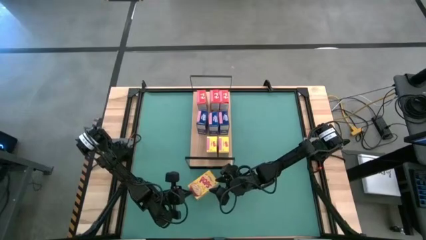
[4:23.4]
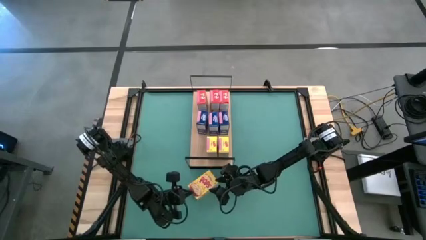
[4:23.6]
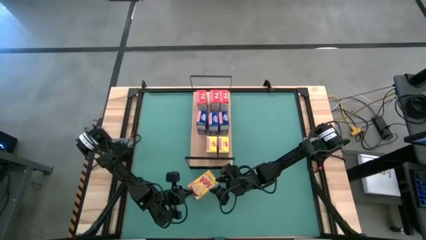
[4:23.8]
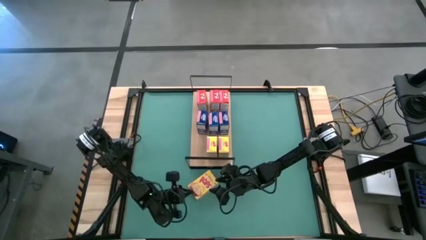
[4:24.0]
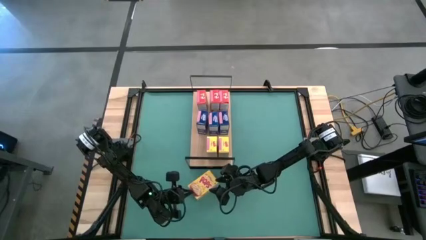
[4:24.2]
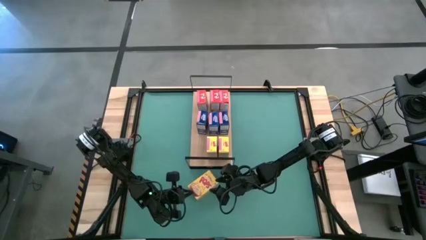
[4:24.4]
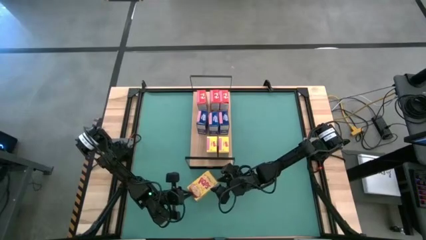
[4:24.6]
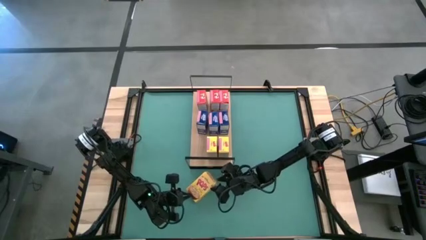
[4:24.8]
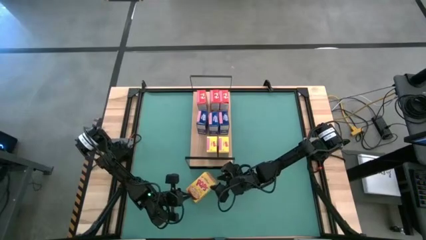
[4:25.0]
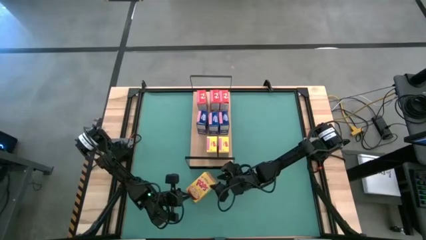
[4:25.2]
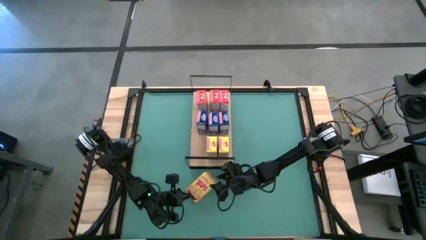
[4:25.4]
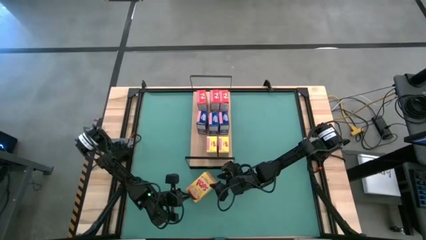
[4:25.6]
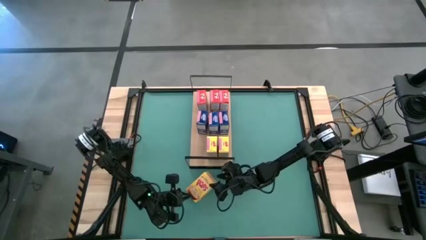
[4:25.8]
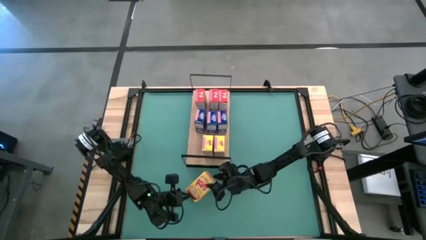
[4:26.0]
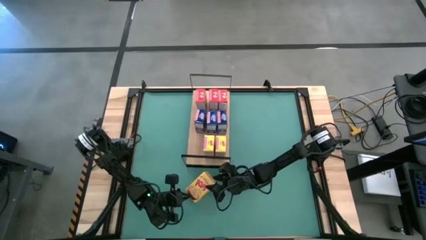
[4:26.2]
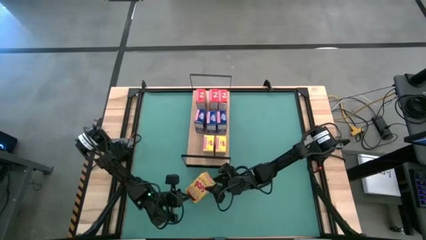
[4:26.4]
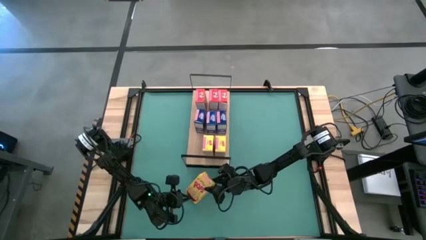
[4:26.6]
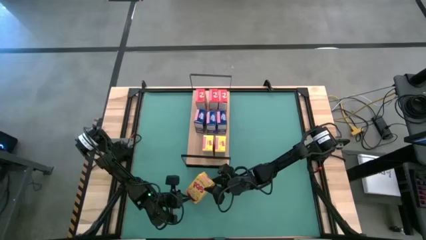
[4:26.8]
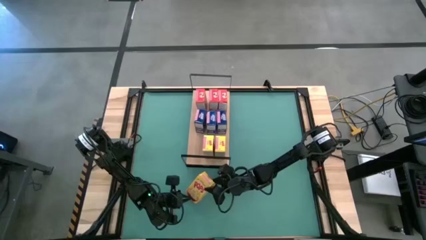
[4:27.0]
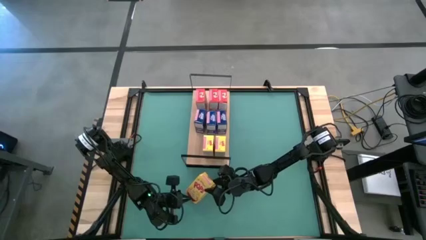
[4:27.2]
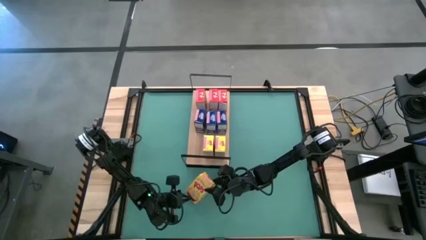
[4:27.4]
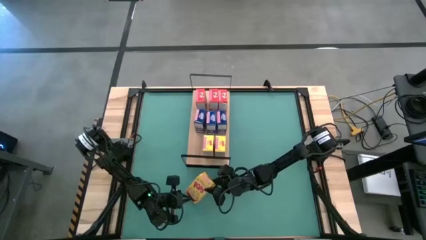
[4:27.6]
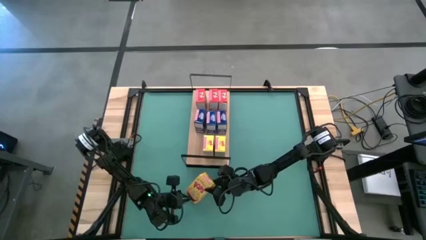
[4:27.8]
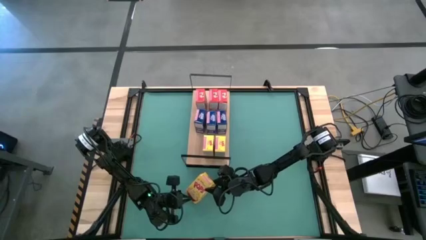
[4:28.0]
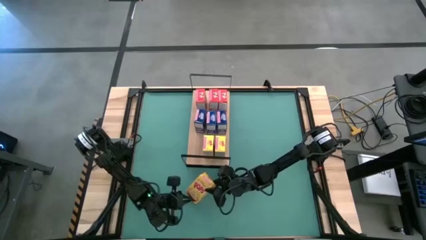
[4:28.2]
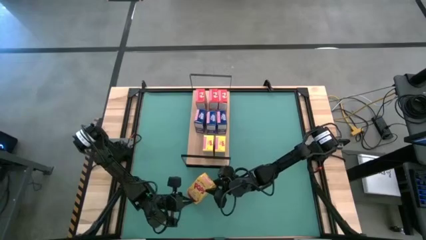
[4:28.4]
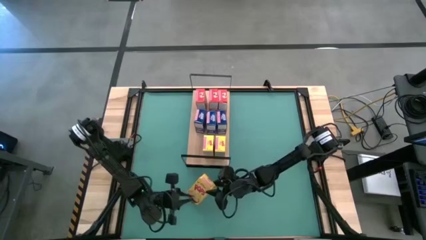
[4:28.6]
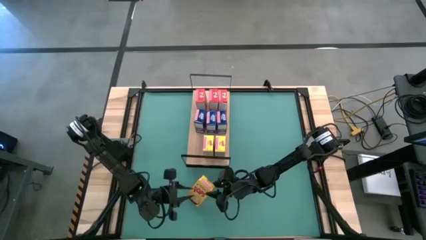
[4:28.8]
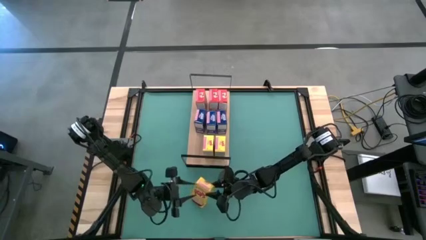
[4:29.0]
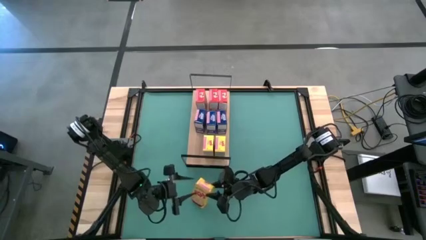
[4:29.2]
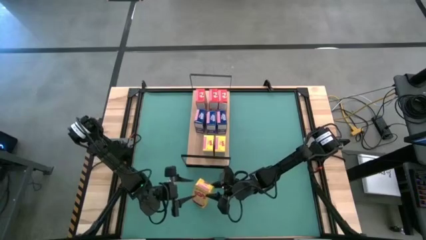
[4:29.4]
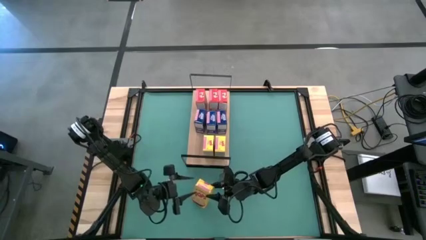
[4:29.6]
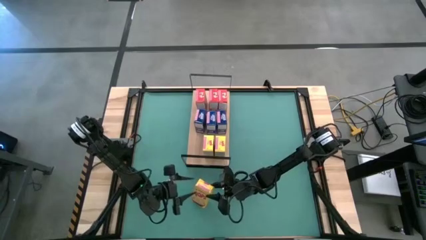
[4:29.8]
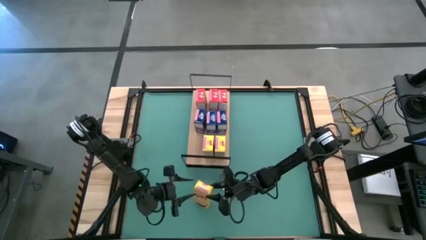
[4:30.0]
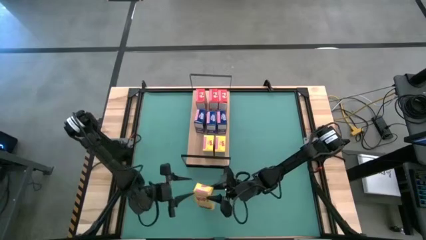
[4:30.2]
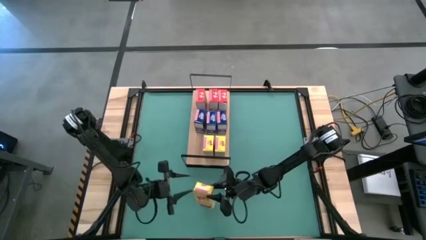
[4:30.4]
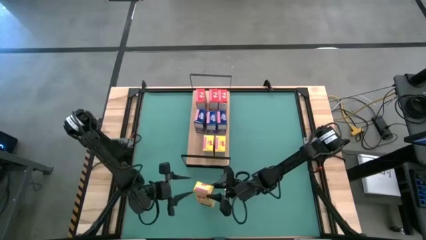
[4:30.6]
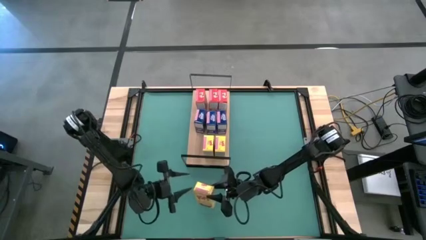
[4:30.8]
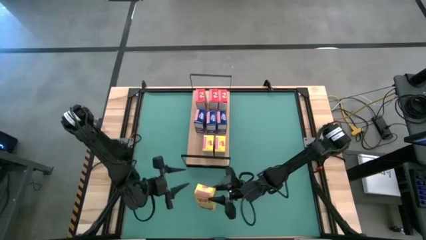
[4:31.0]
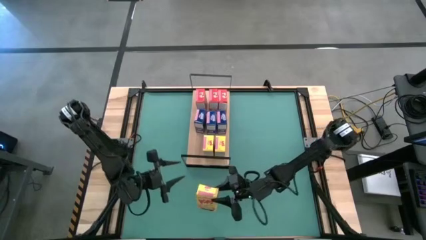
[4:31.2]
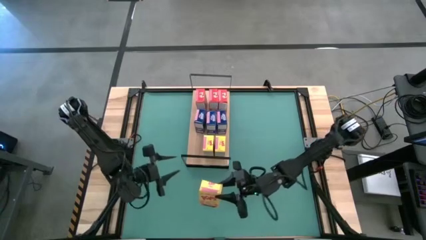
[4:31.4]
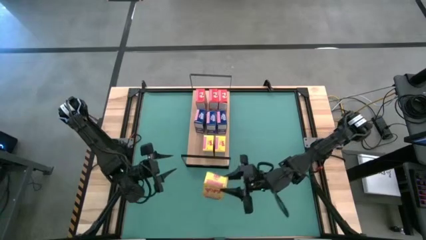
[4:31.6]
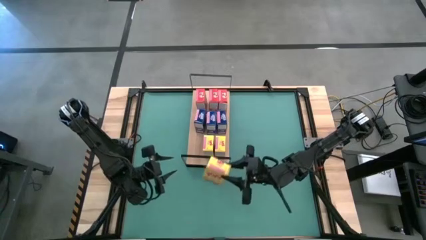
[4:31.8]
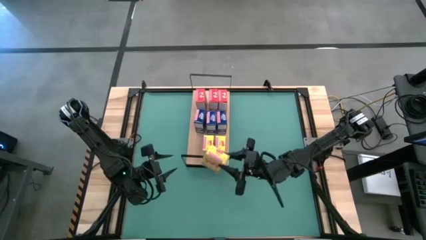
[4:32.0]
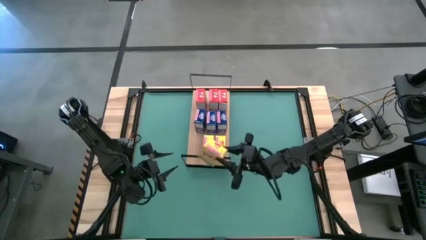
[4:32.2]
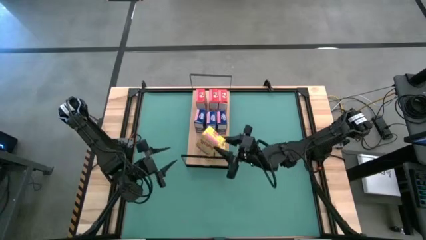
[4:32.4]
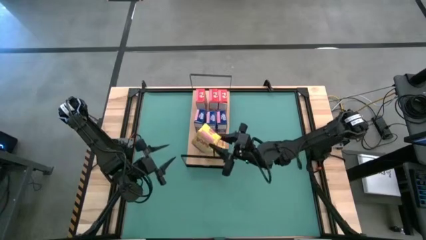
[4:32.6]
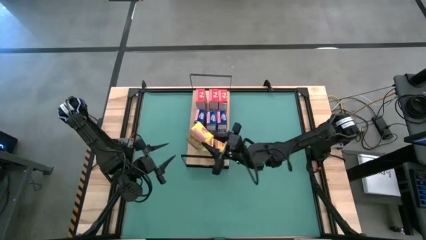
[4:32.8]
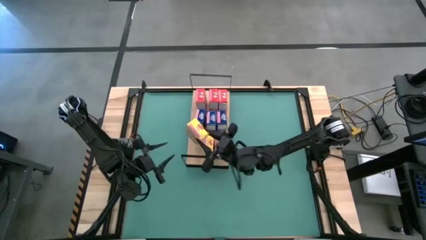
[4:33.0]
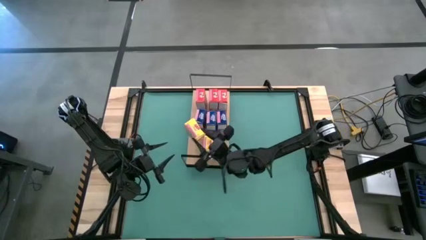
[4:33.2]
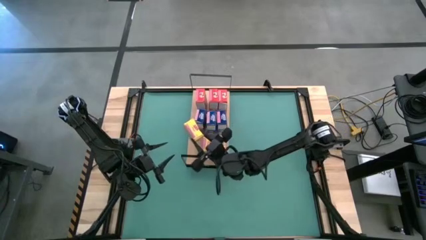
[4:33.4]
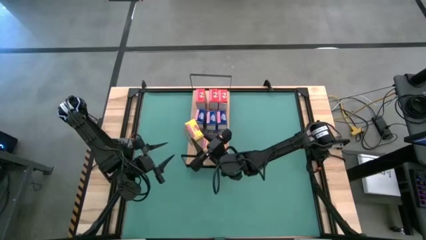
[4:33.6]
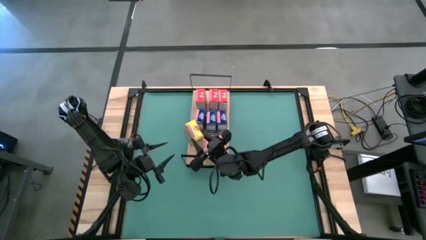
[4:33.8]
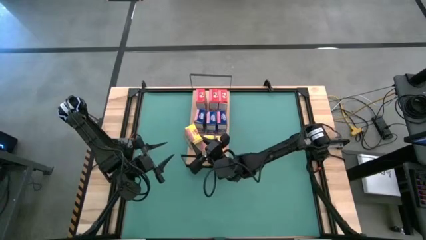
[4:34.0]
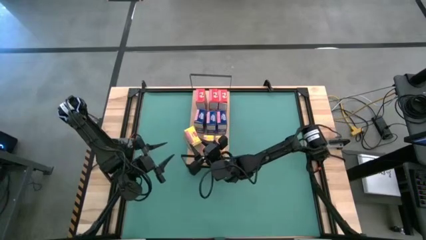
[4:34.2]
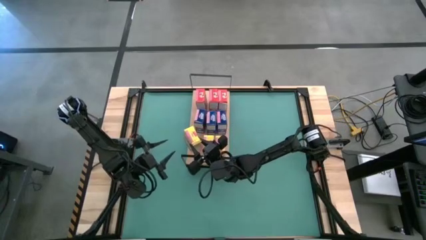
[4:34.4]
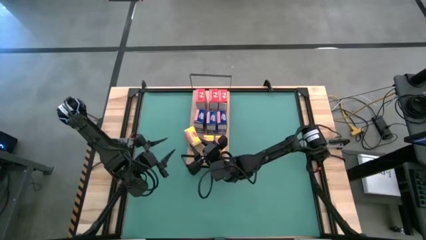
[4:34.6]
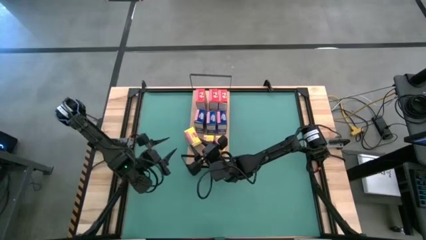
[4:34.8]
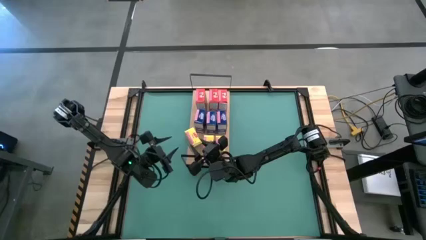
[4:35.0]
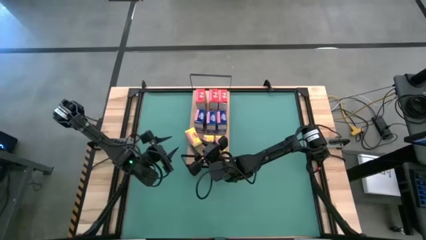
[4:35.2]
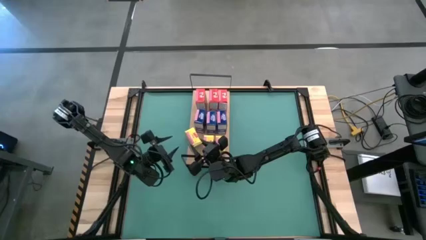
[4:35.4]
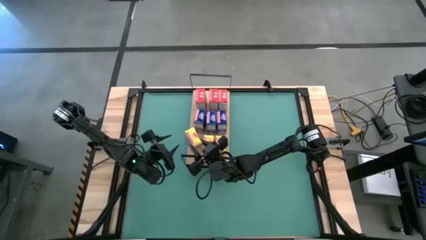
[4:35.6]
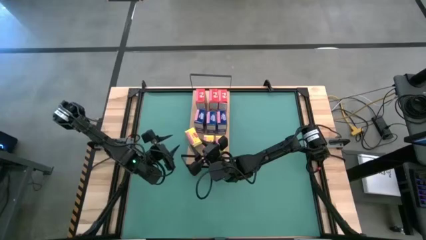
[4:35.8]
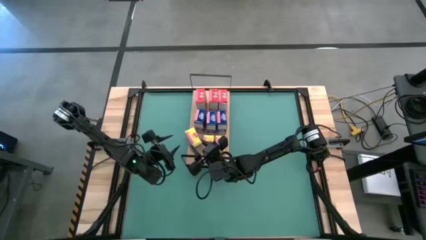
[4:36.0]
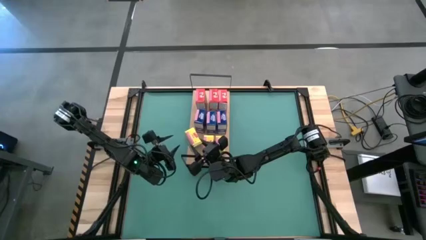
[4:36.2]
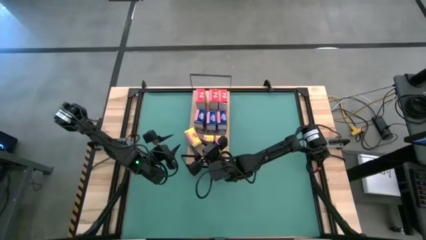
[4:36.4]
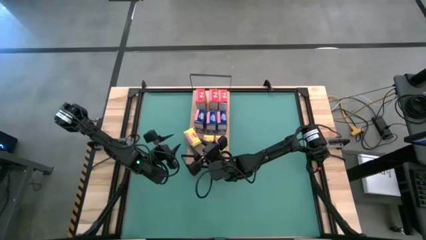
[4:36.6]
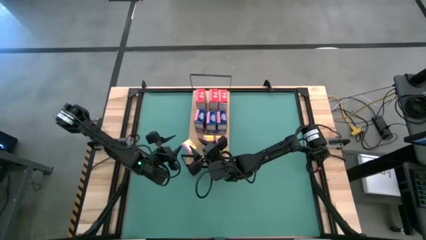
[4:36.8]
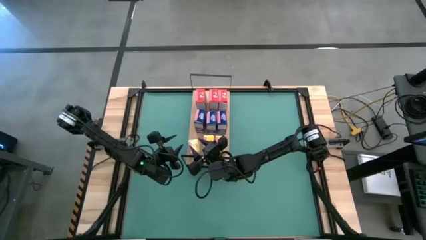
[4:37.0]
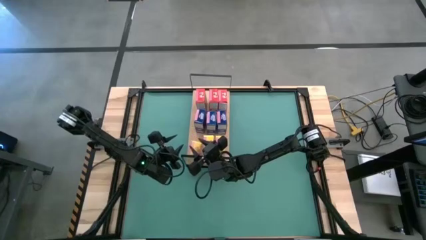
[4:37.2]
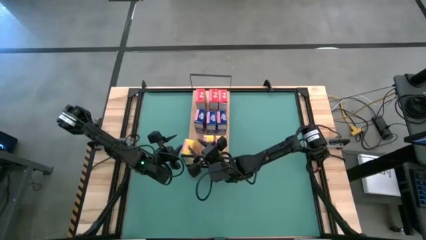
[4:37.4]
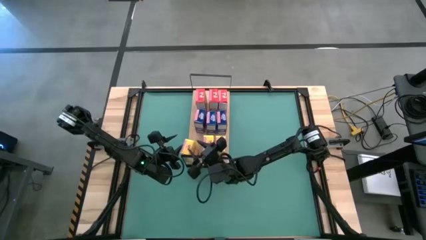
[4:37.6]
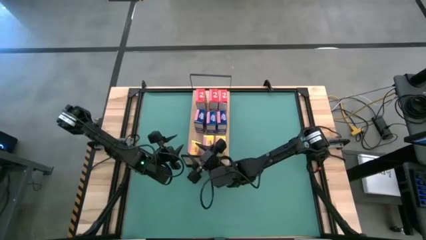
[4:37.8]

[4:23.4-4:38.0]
Task: Stack cereal on shelf
Put the yellow cereal box on the shelf and align it with the other yellow cereal box

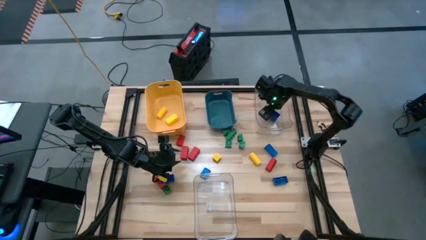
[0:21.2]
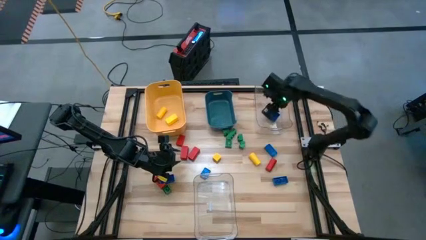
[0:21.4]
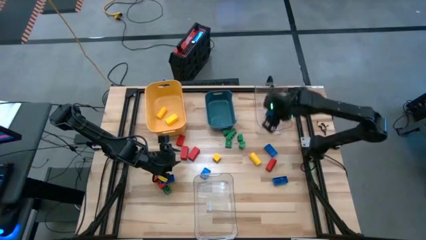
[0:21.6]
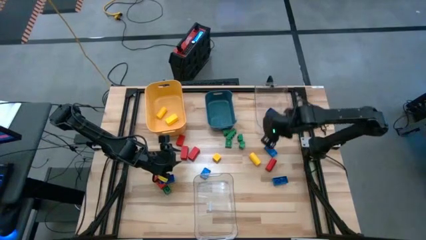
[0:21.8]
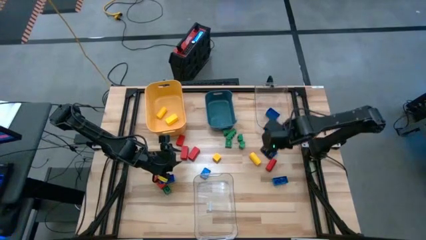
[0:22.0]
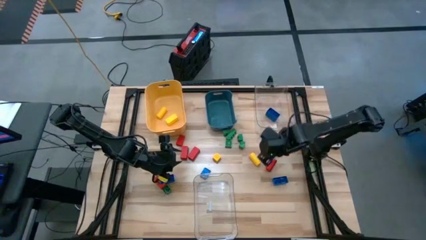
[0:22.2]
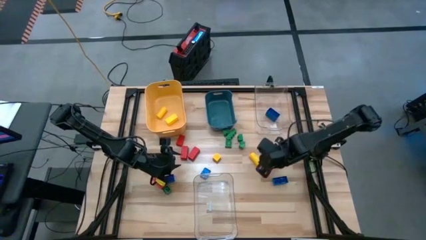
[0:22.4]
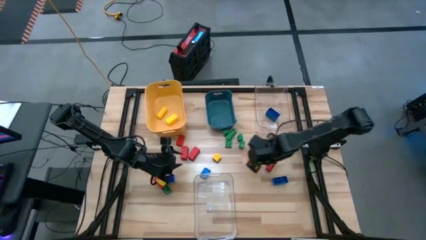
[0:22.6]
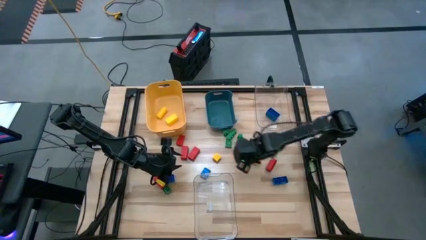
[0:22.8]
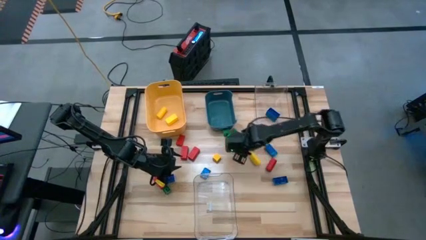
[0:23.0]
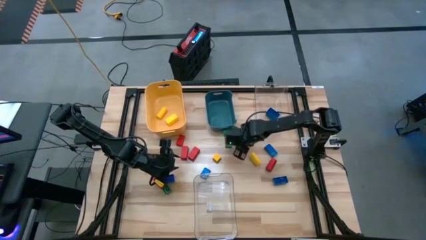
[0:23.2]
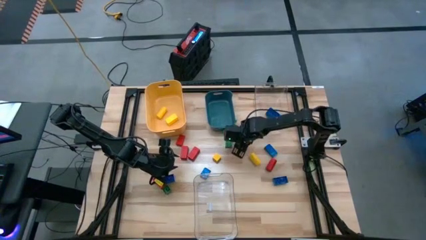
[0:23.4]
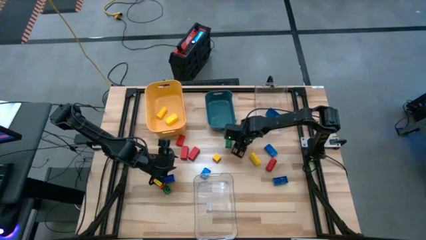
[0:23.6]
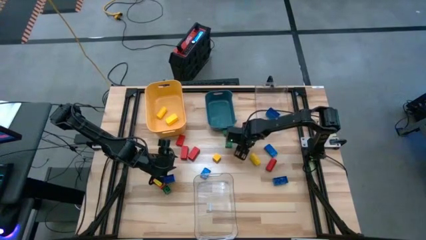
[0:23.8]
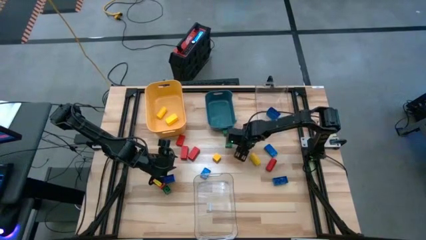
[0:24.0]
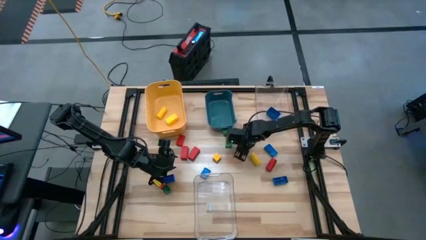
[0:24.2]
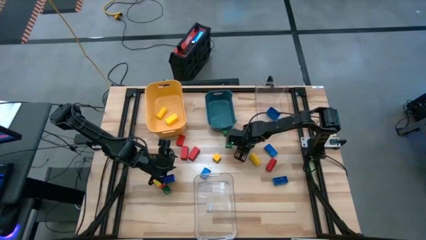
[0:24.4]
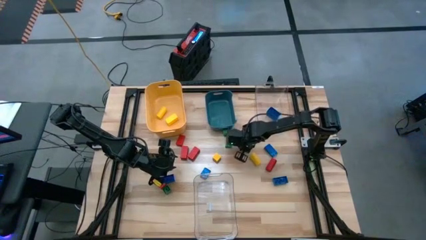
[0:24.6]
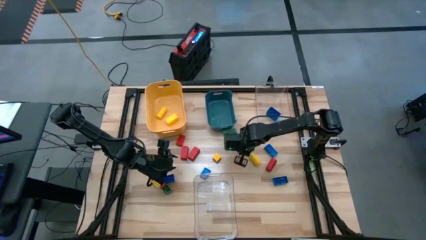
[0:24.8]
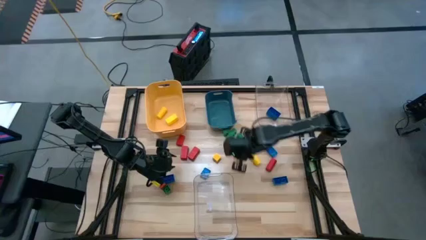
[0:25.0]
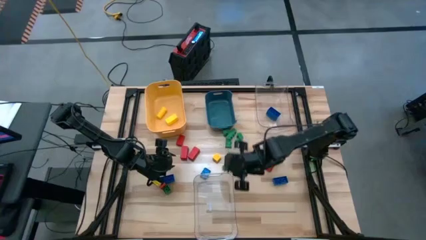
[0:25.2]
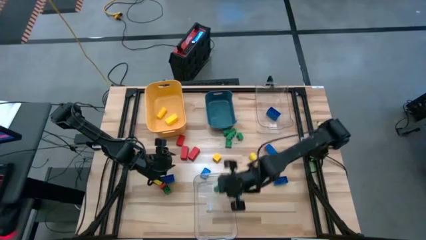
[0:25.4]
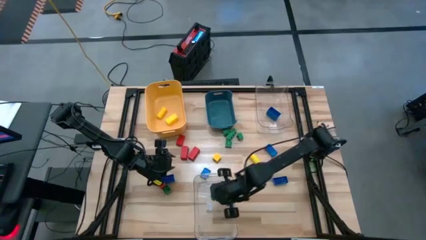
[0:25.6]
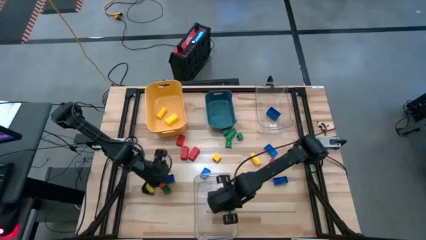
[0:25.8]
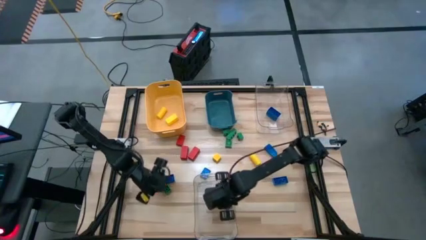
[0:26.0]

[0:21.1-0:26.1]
Task: Sort blocks
Put the green game piece into the bottom transparent bin
